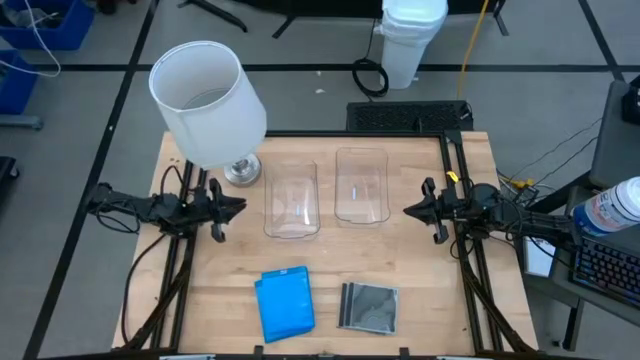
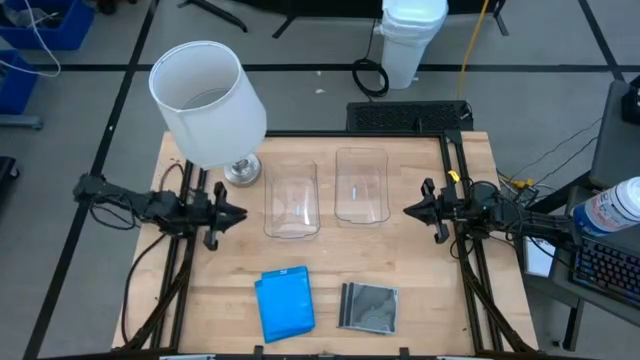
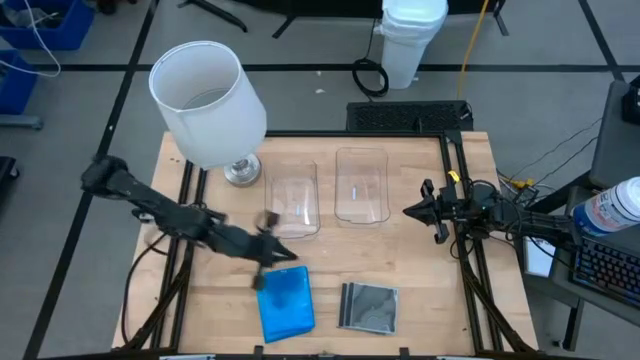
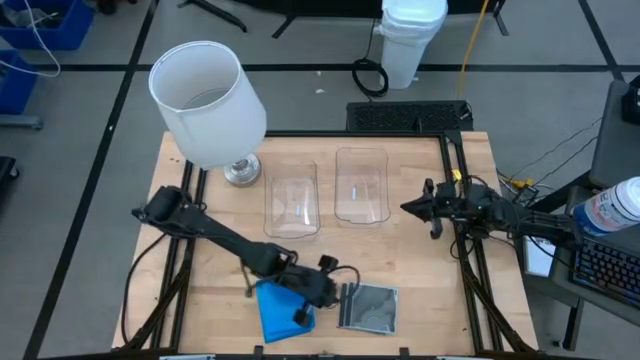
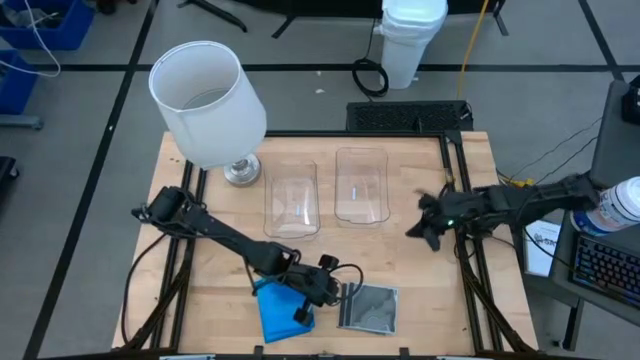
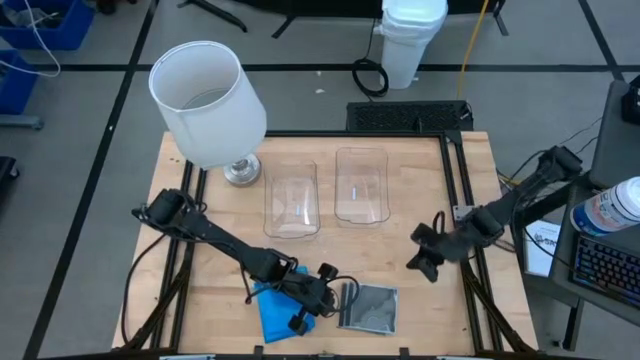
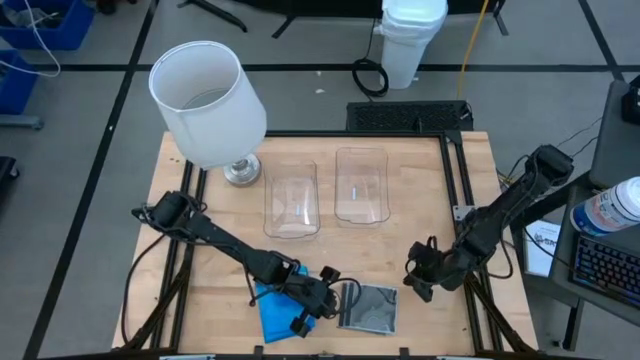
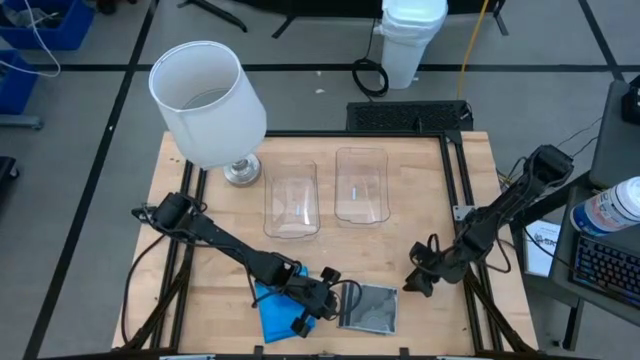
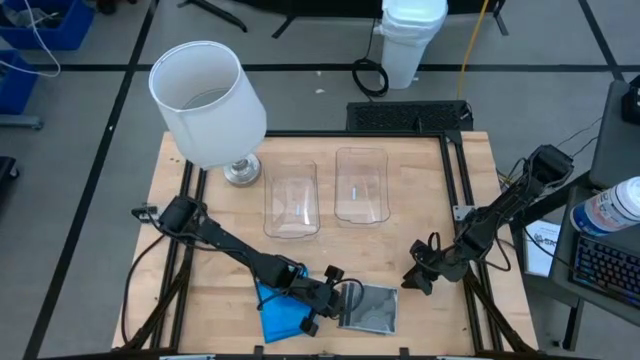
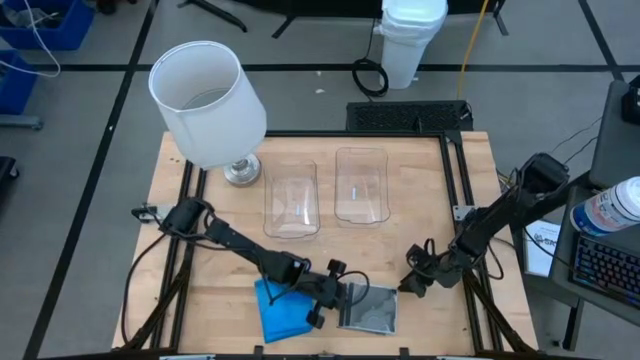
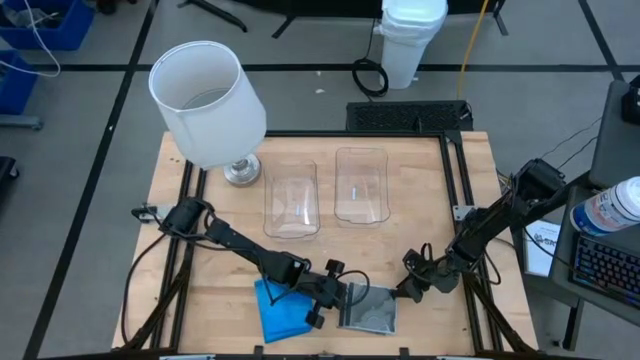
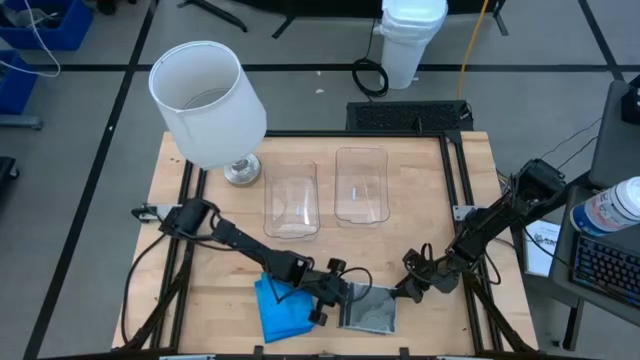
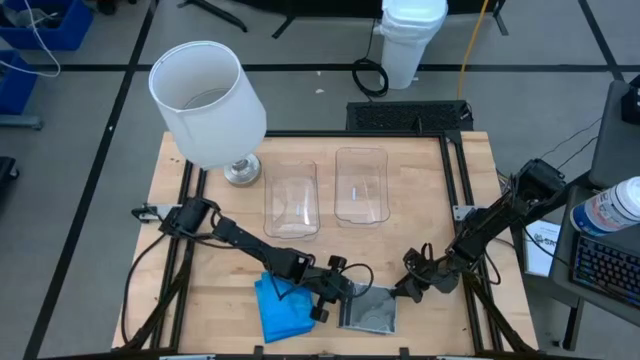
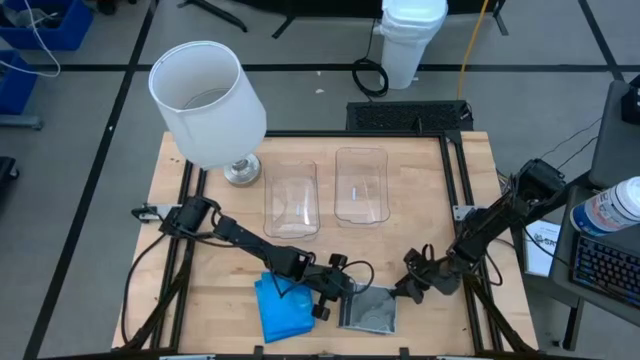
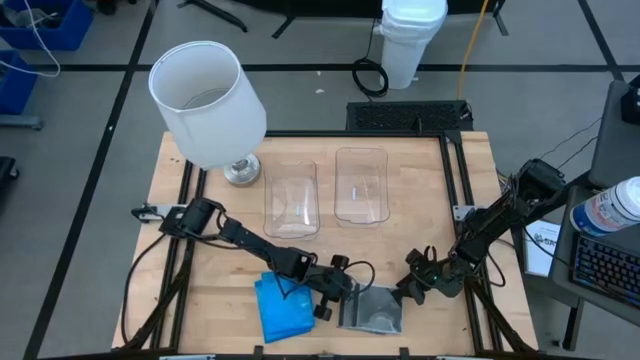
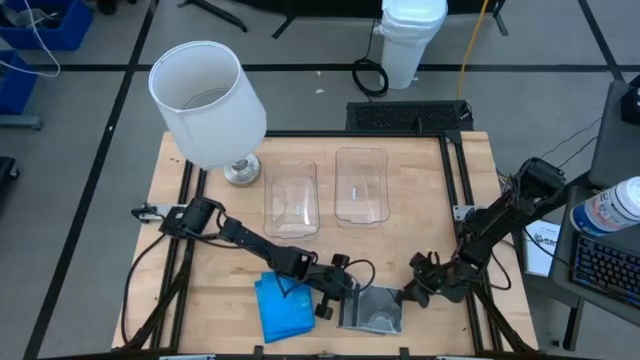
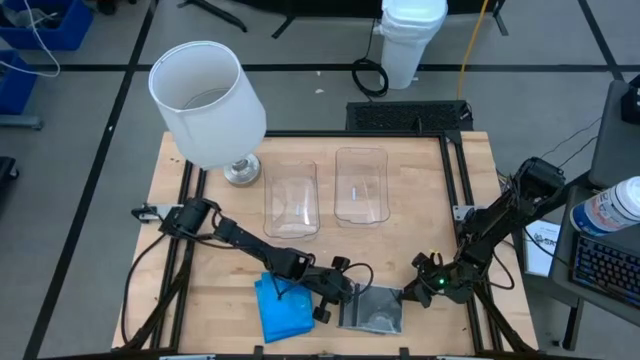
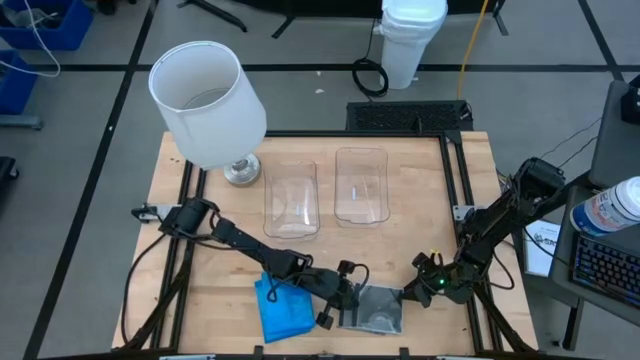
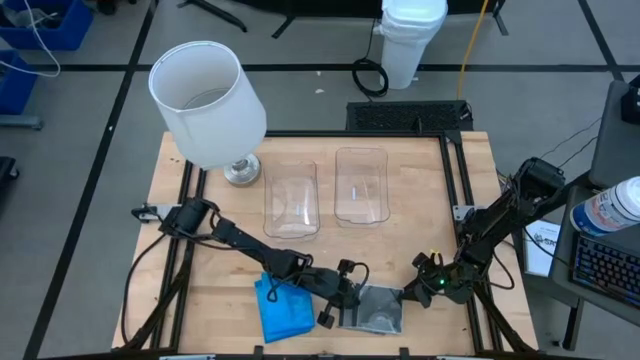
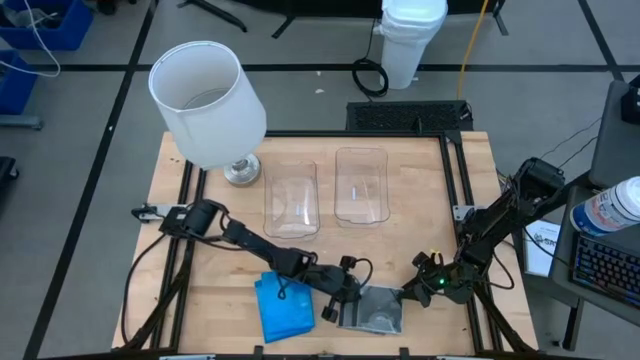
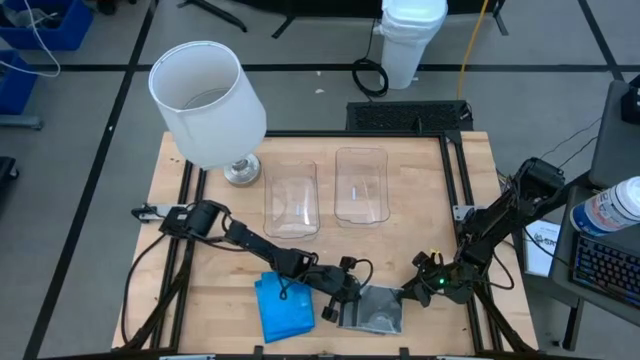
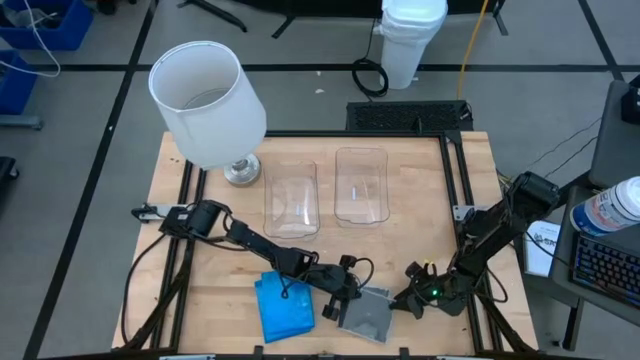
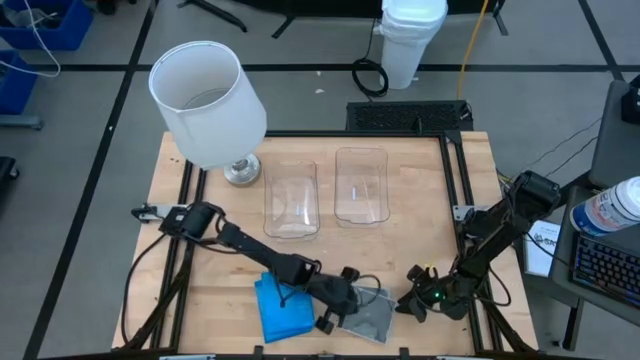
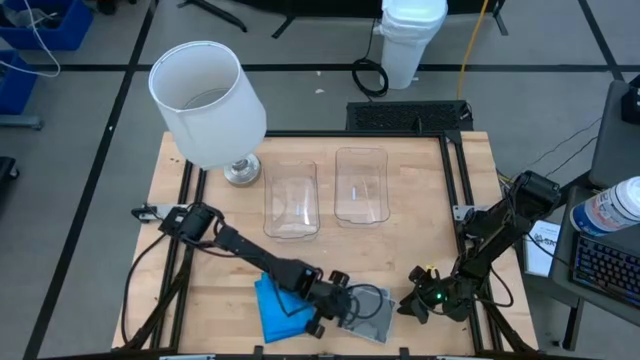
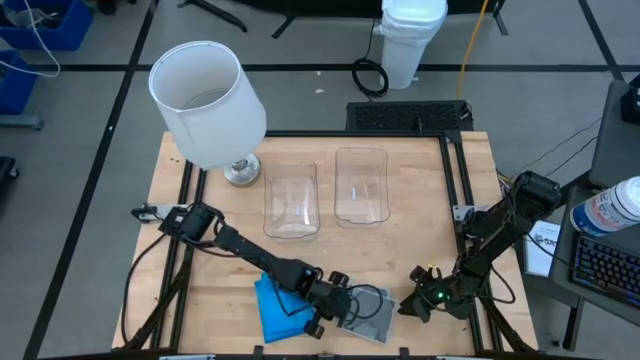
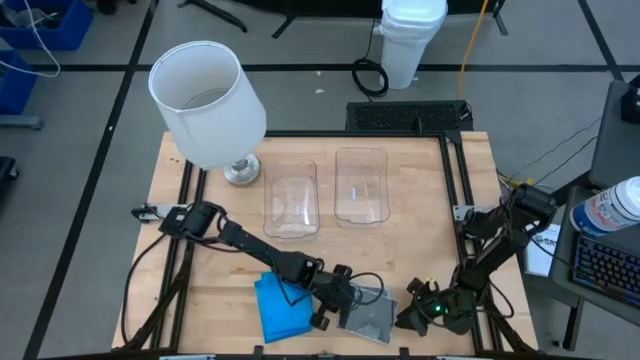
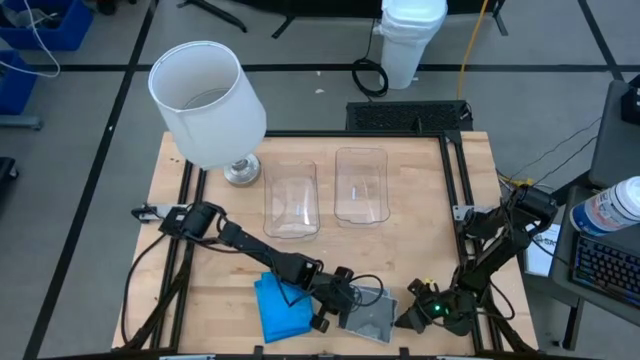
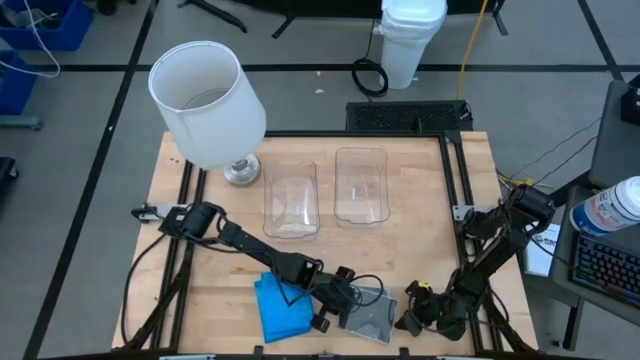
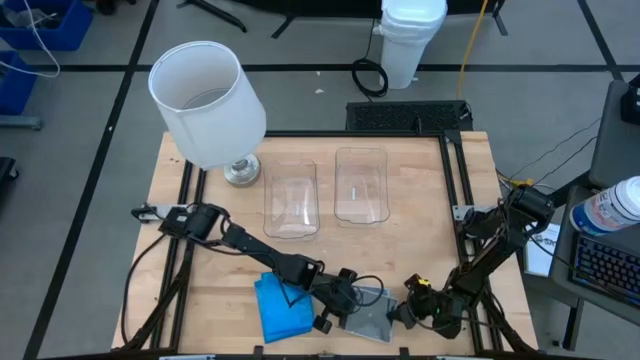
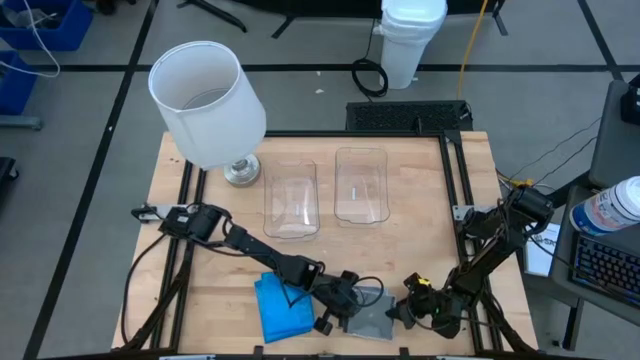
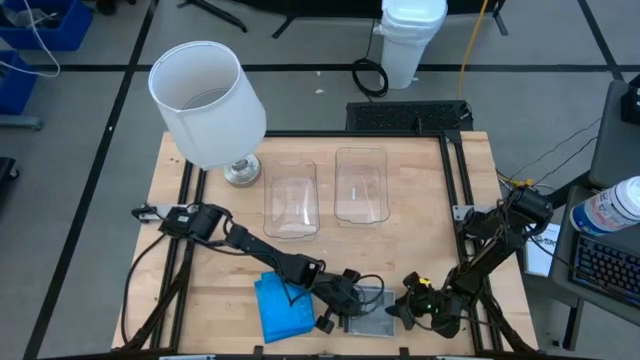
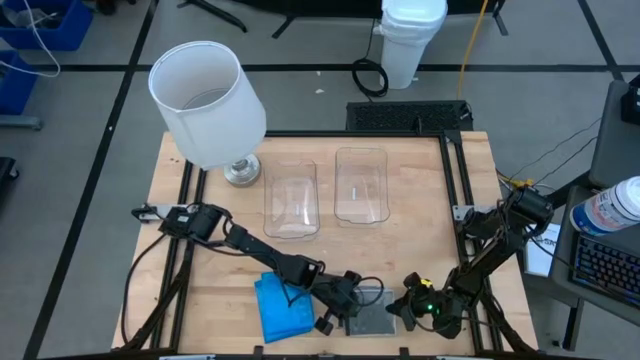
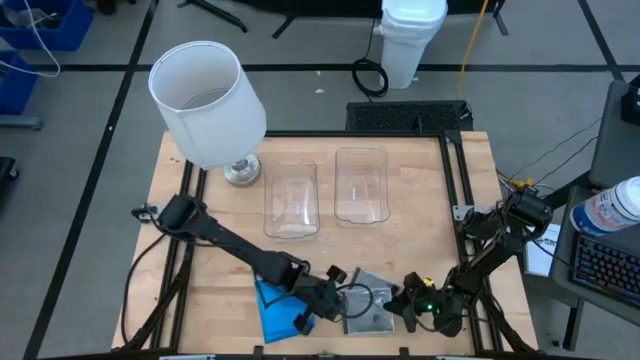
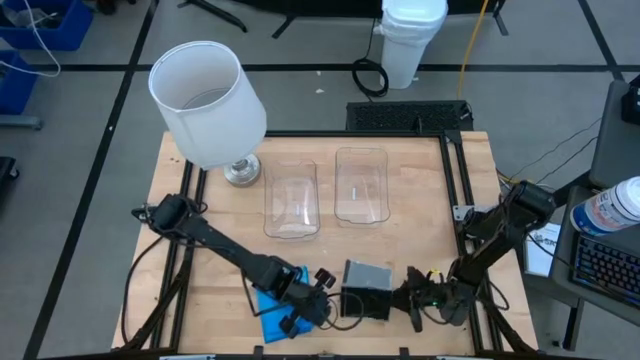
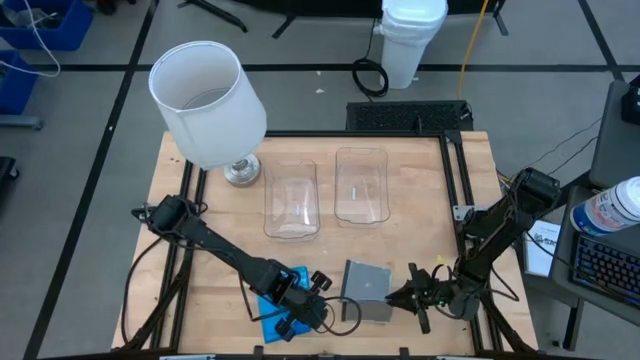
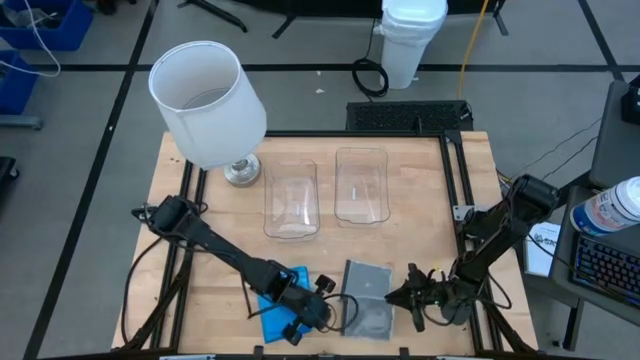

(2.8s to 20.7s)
Task: Pick & place jewel cases by type
Put the black CD case into the right transparent bin

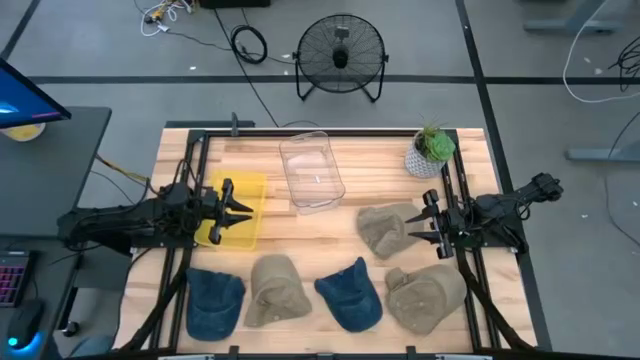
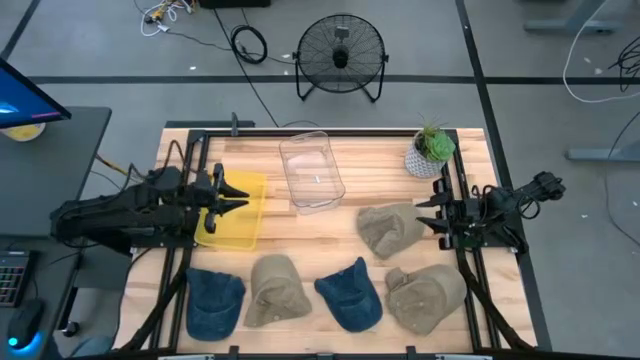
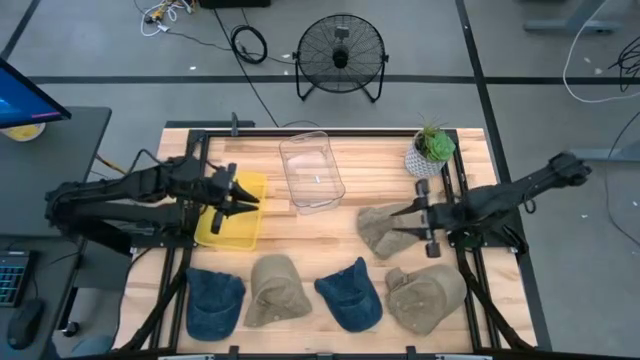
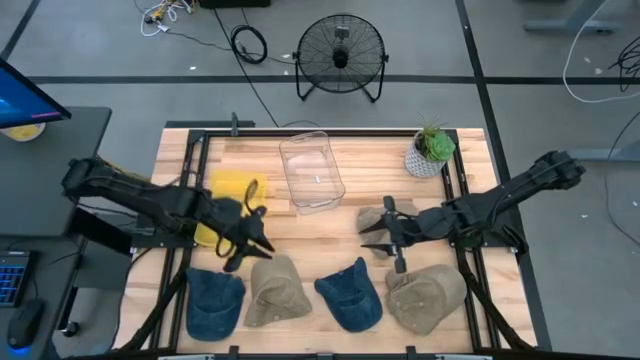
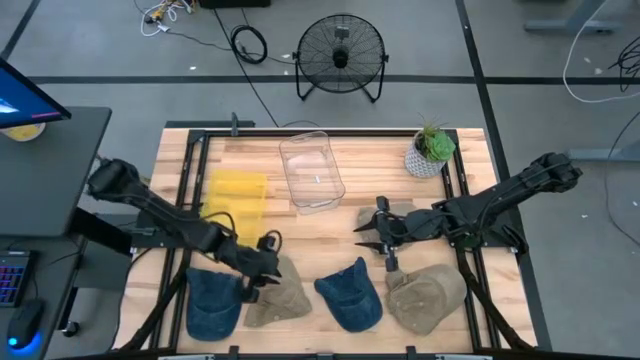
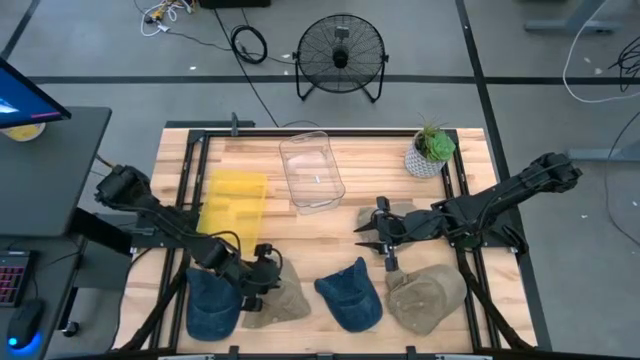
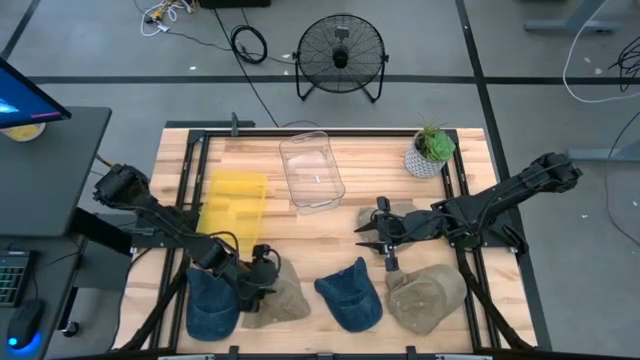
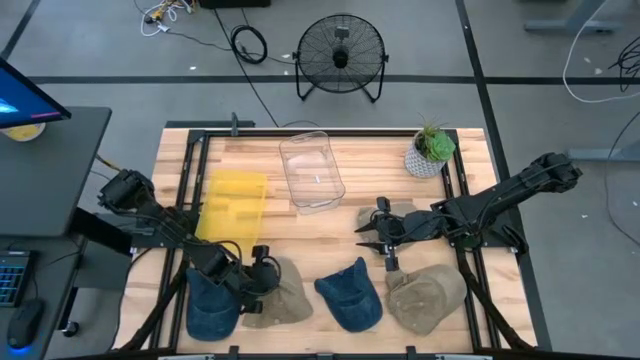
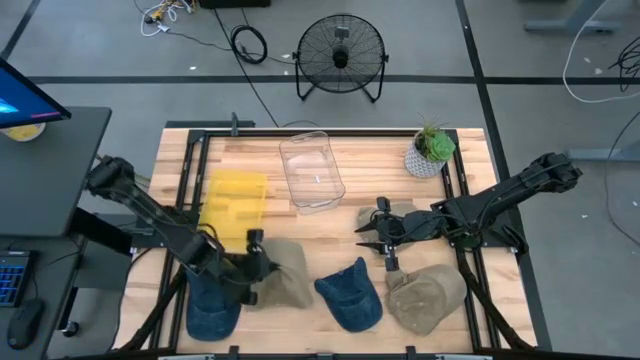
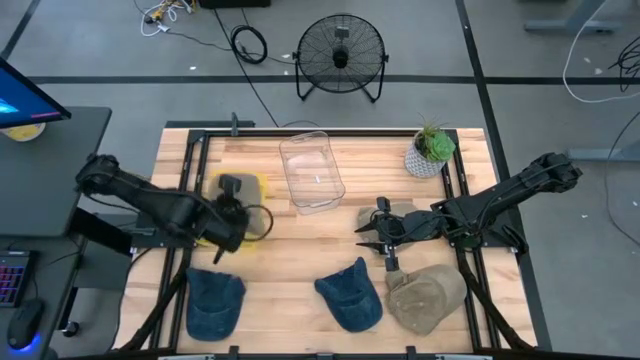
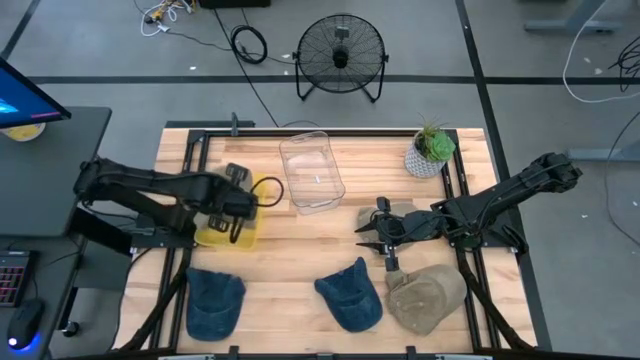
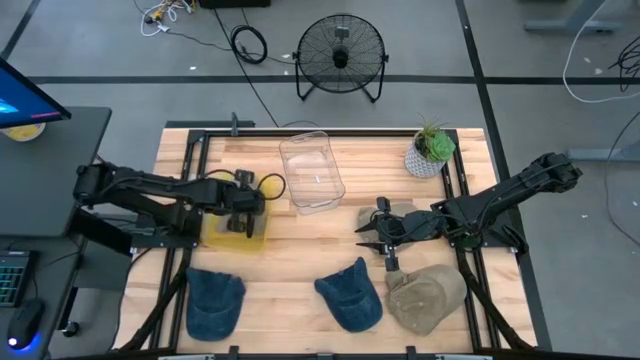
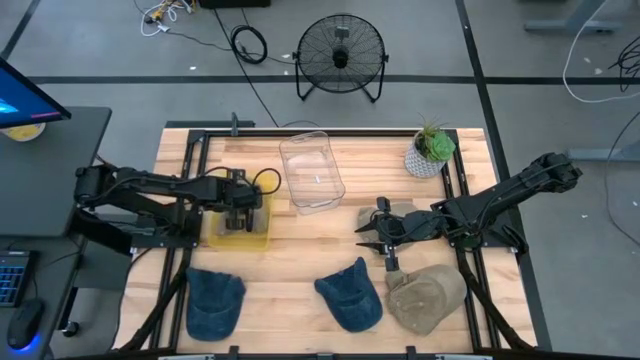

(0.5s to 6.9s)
Task: Pick & Place hat
Put the bottom left brown cap into the yellow bin
